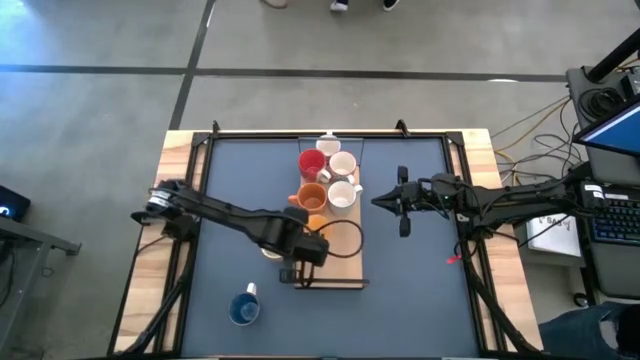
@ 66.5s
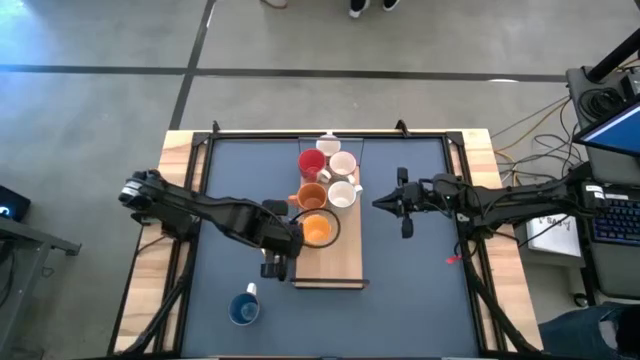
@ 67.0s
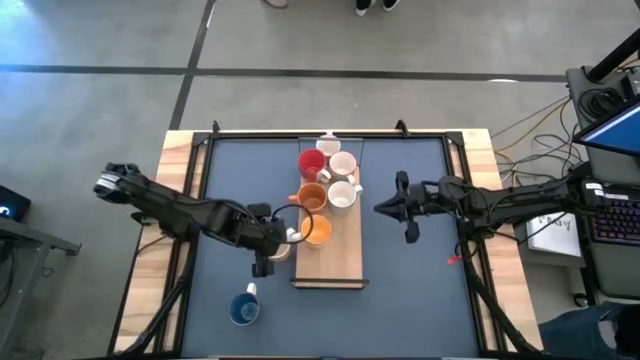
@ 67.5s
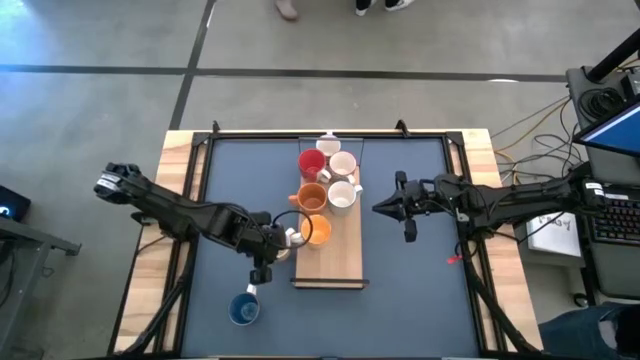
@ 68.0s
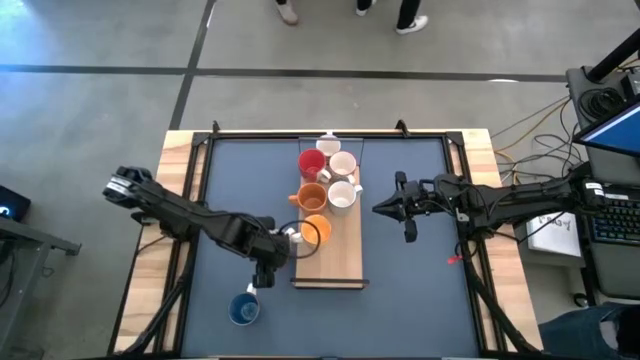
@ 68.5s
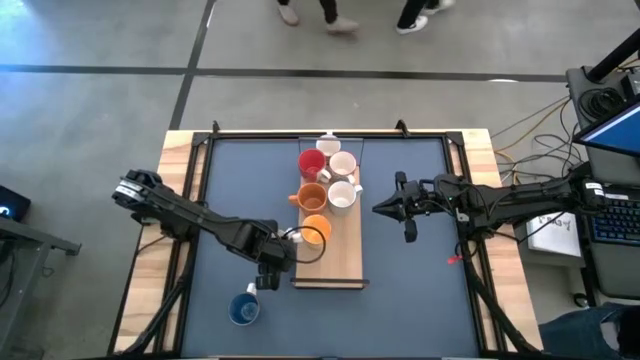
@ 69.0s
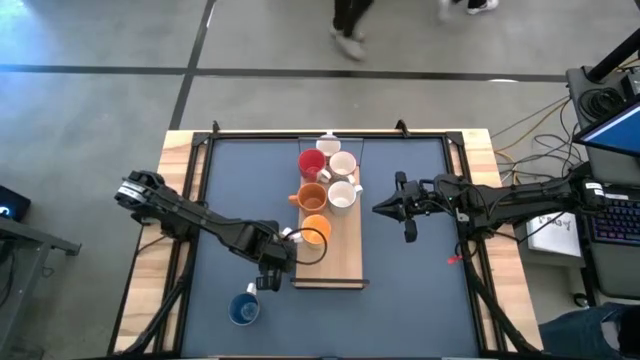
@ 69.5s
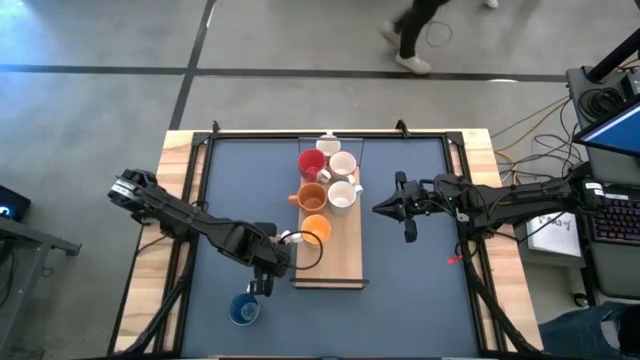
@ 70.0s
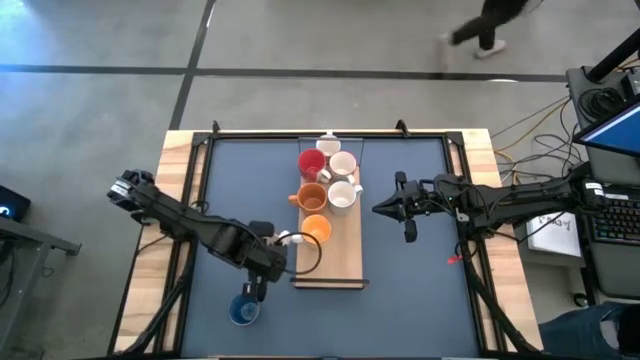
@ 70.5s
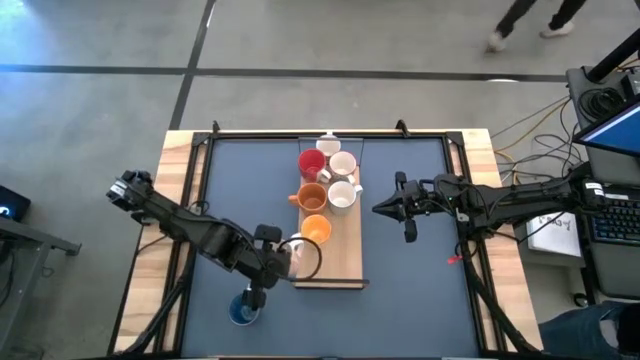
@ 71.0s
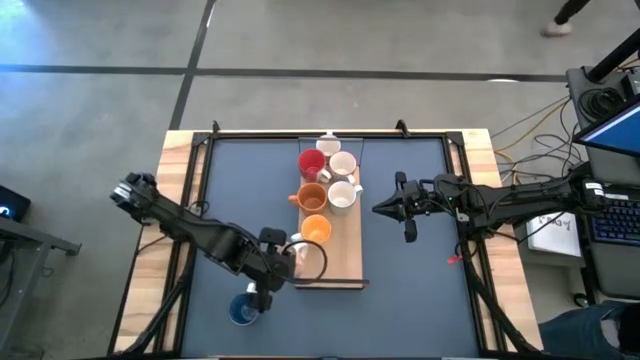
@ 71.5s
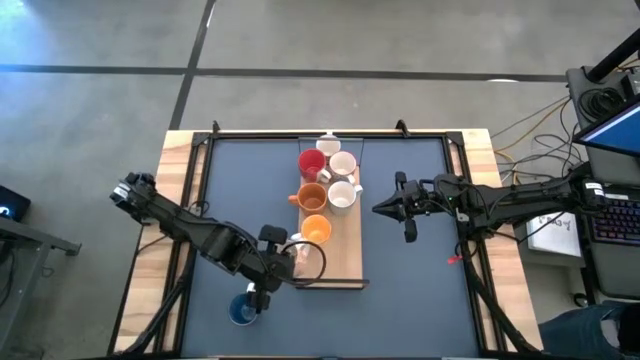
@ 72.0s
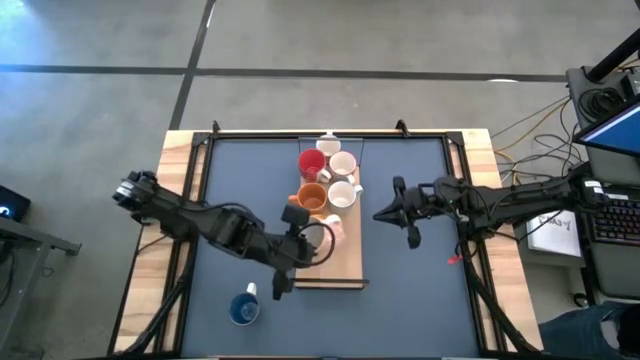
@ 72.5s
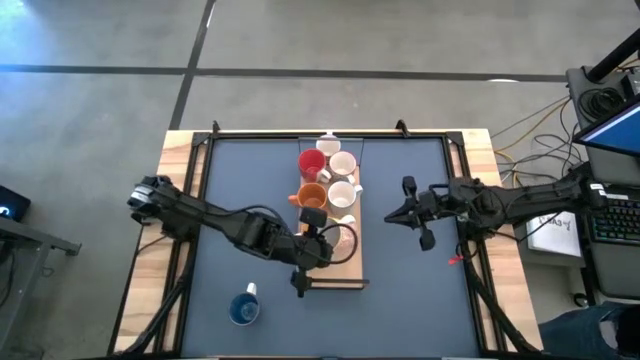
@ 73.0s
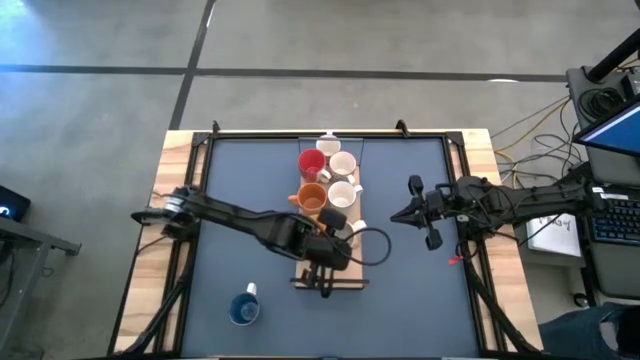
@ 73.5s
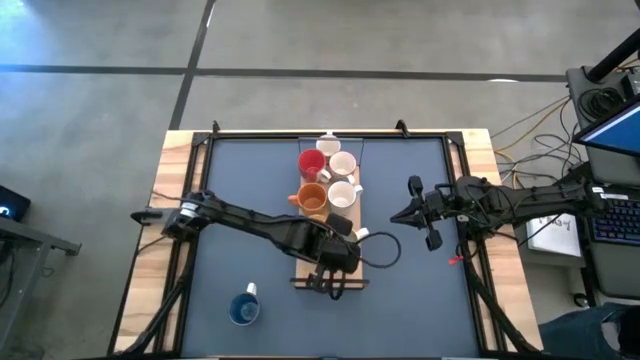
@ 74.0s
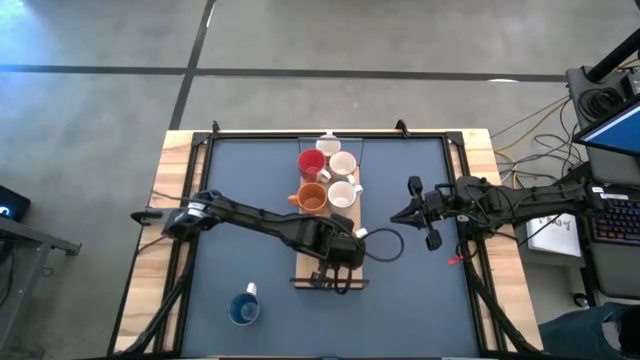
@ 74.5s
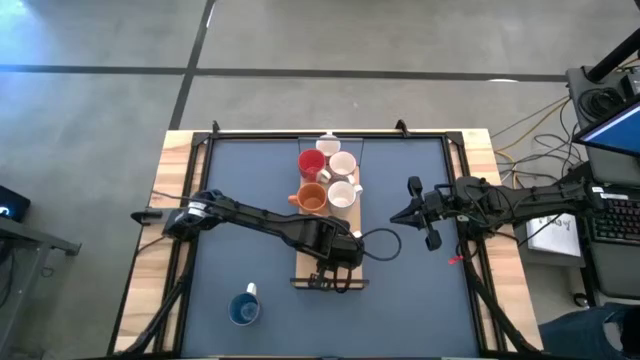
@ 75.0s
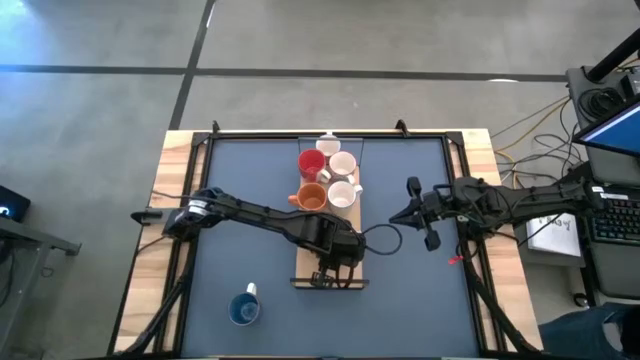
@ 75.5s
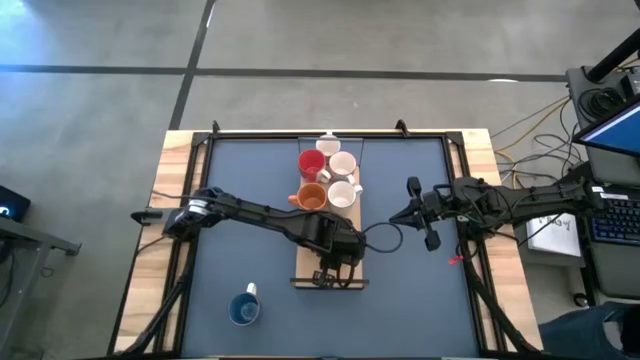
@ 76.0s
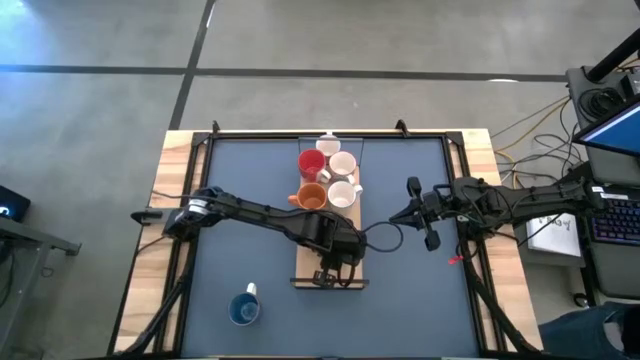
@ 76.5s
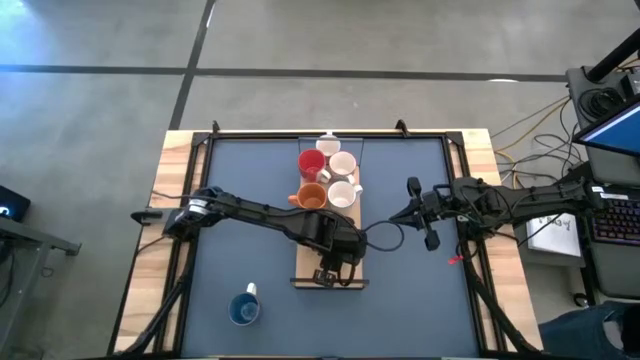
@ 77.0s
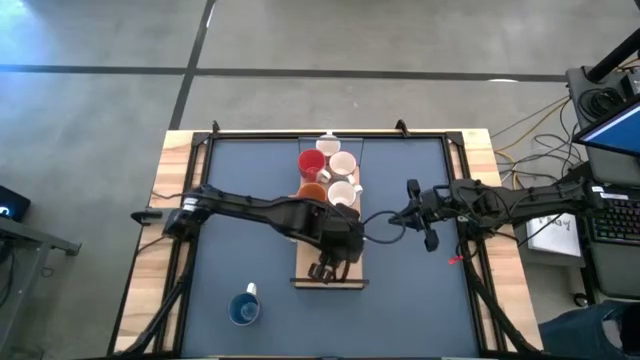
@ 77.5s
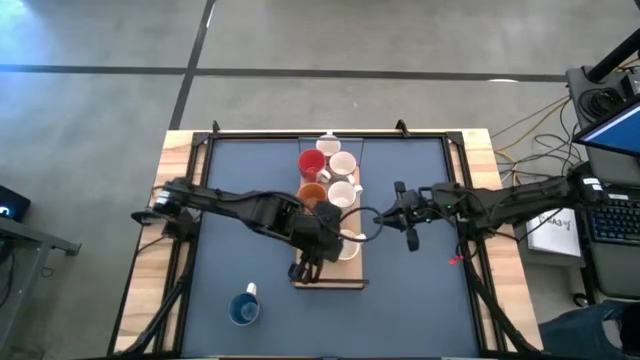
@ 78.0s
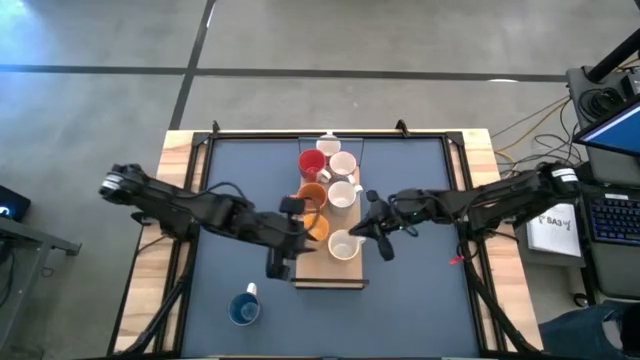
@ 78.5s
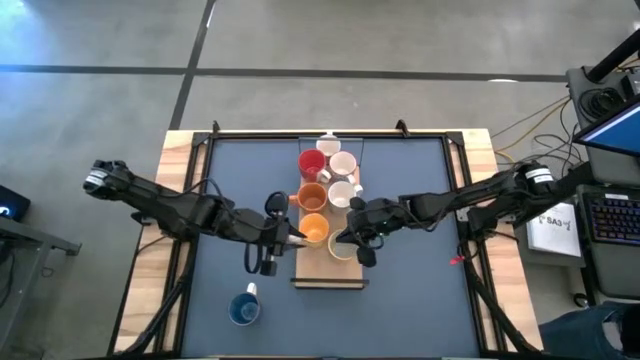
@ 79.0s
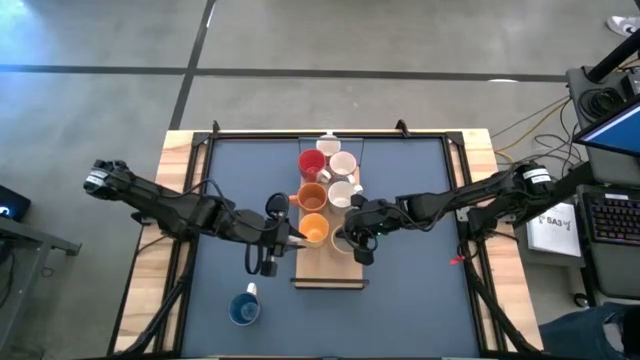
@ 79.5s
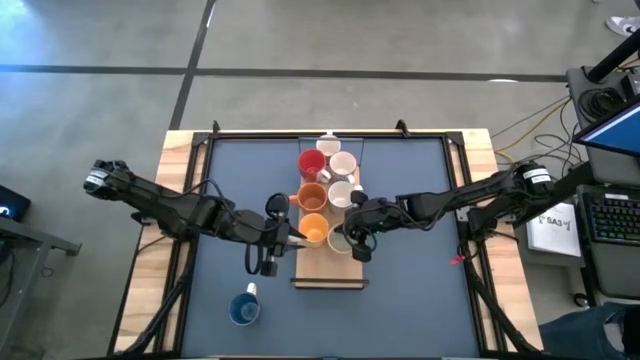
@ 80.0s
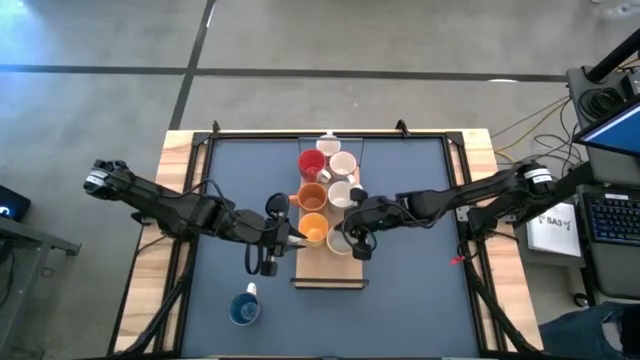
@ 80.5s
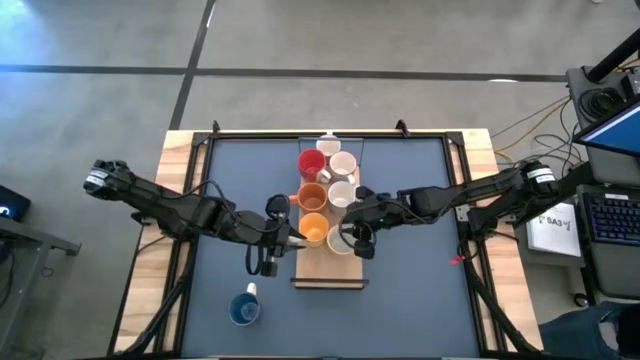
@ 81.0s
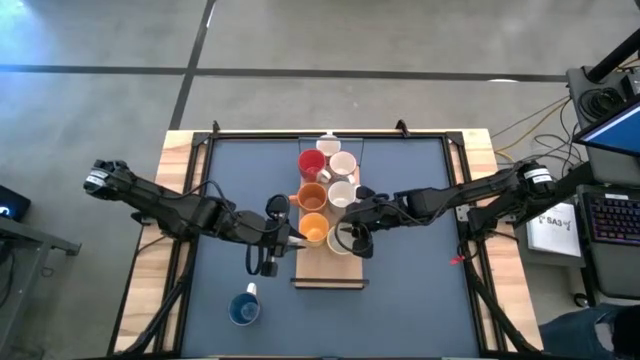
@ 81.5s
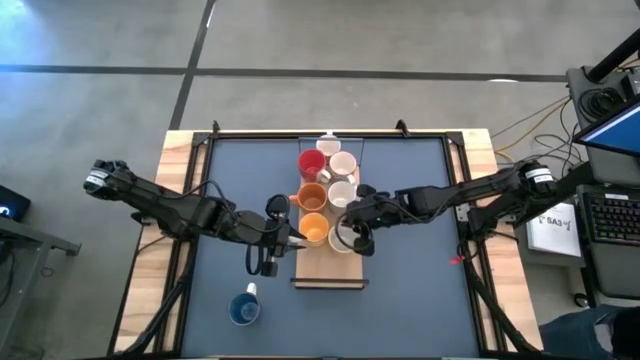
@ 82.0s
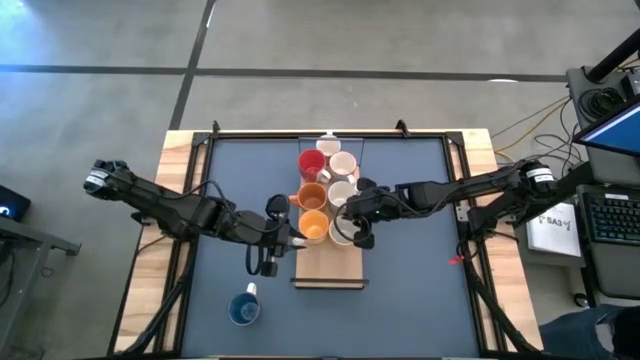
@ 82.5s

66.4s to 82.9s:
Task: Place coffee mugs
Put the orange patterned mug on the shelf

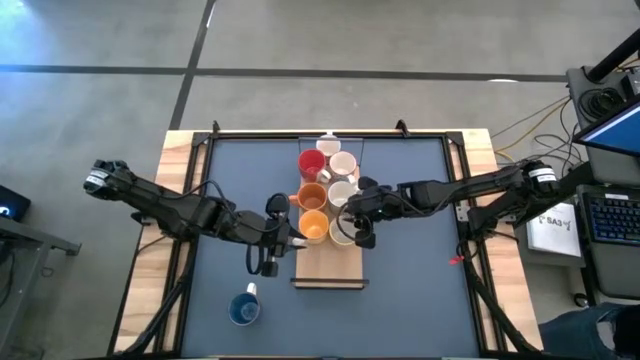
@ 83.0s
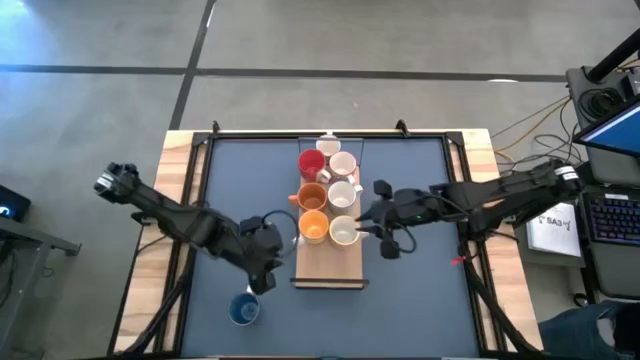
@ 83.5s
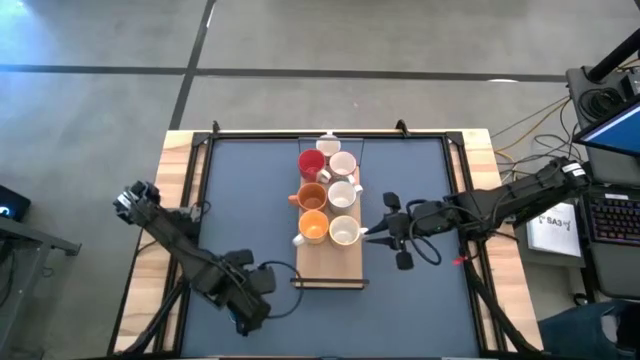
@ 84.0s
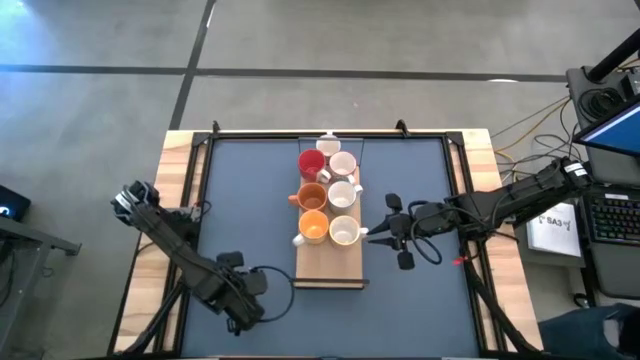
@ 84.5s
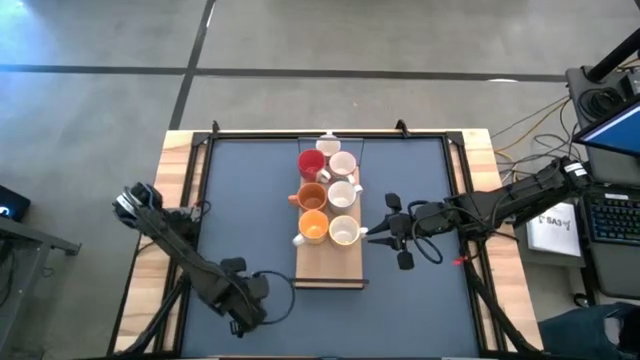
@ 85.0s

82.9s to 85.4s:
Put the blue mug on the shelf
